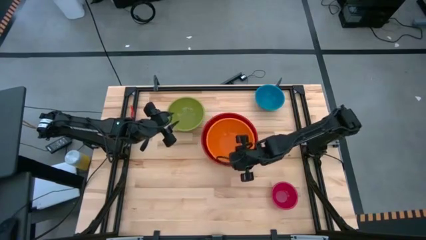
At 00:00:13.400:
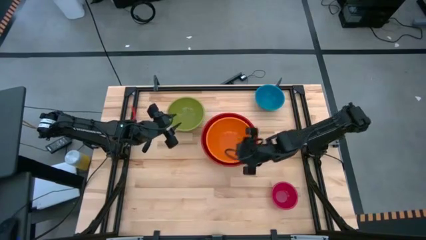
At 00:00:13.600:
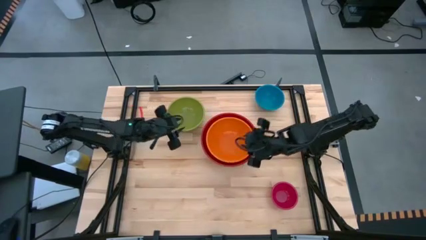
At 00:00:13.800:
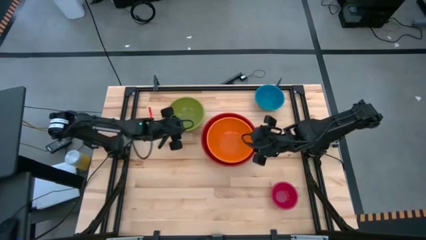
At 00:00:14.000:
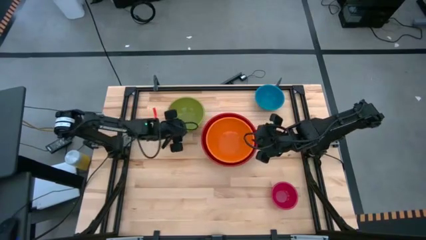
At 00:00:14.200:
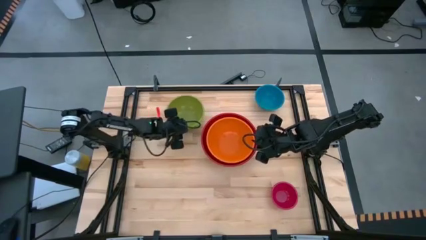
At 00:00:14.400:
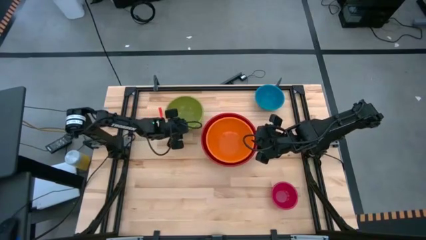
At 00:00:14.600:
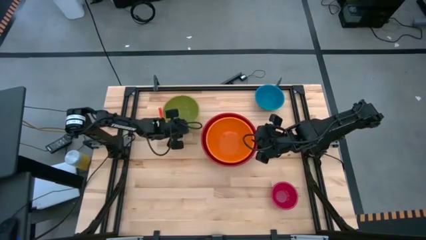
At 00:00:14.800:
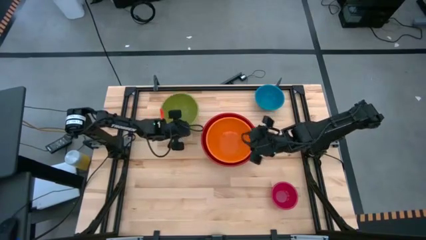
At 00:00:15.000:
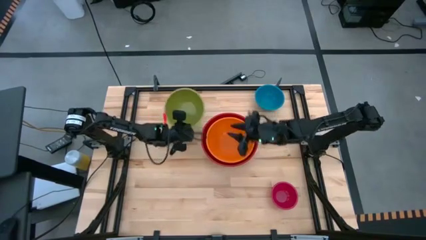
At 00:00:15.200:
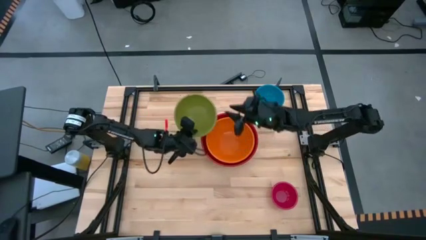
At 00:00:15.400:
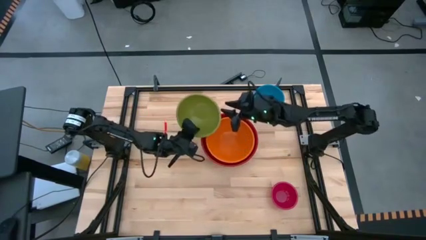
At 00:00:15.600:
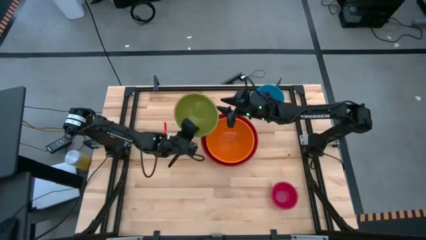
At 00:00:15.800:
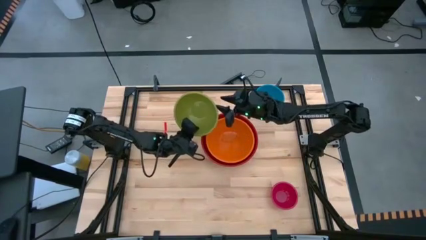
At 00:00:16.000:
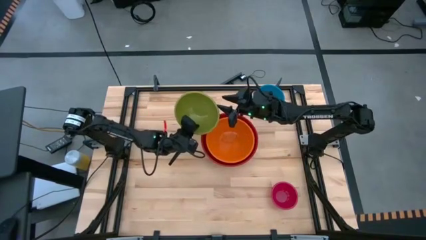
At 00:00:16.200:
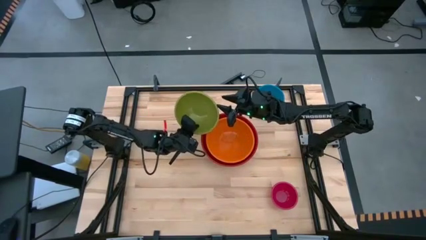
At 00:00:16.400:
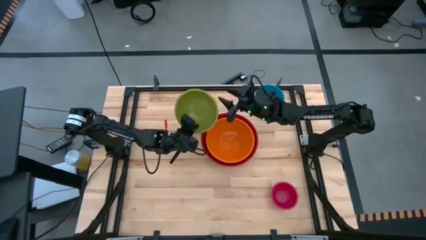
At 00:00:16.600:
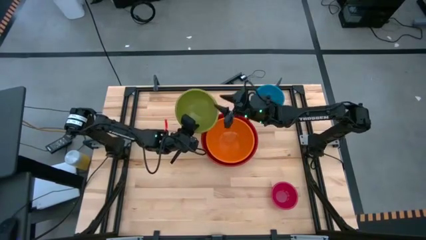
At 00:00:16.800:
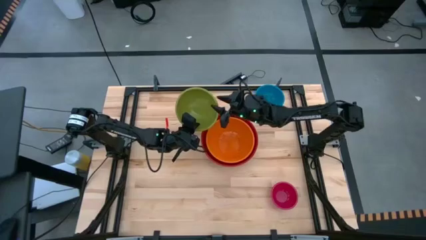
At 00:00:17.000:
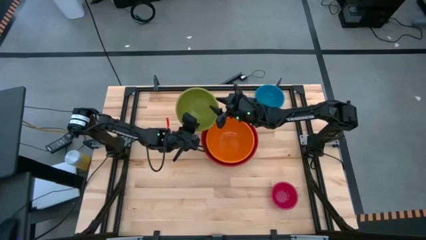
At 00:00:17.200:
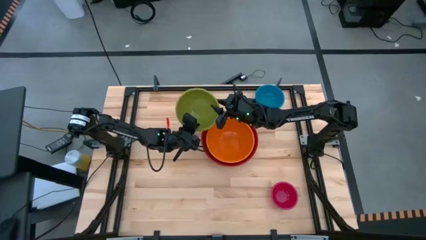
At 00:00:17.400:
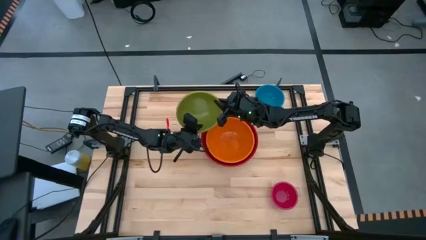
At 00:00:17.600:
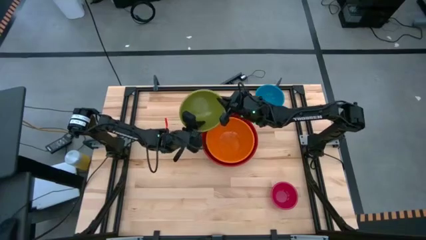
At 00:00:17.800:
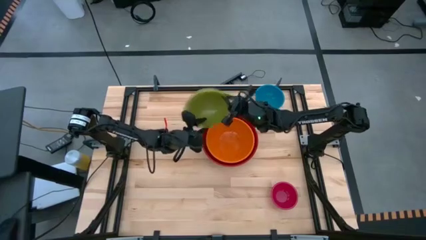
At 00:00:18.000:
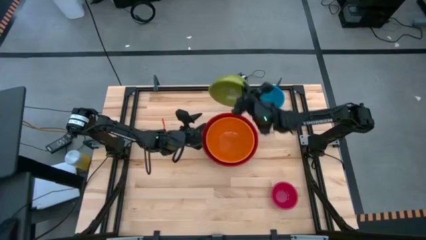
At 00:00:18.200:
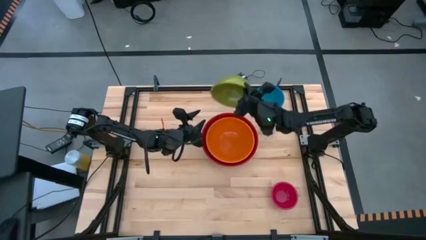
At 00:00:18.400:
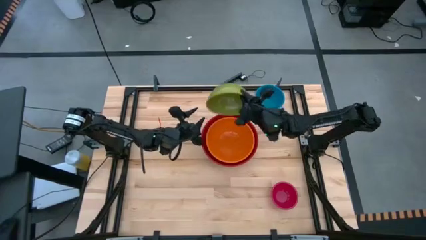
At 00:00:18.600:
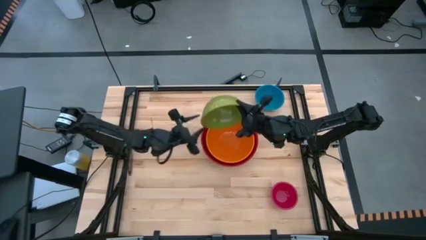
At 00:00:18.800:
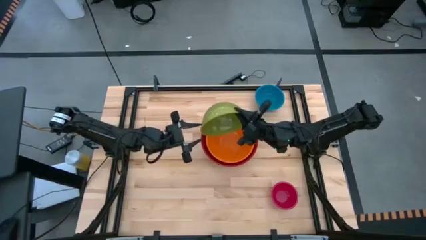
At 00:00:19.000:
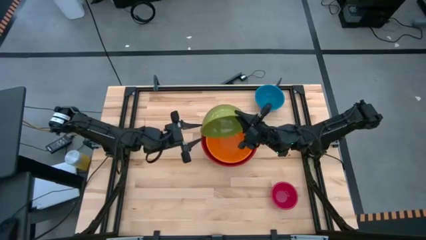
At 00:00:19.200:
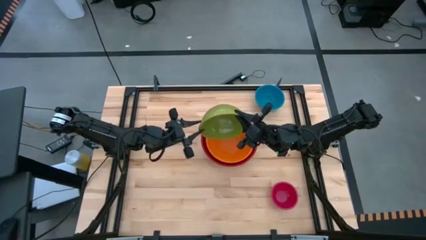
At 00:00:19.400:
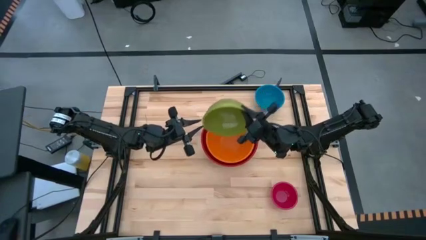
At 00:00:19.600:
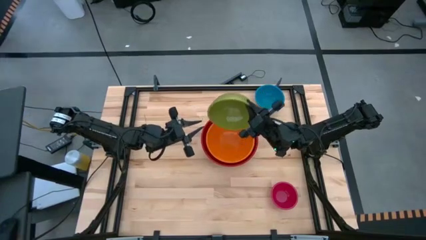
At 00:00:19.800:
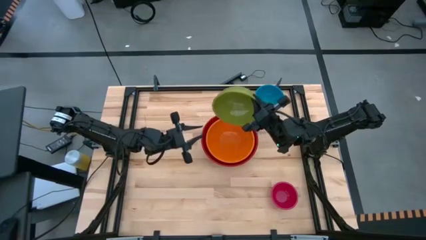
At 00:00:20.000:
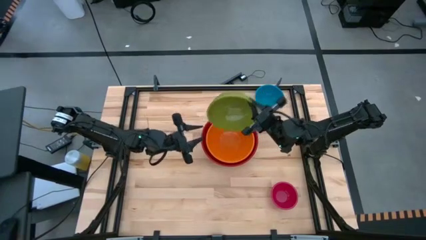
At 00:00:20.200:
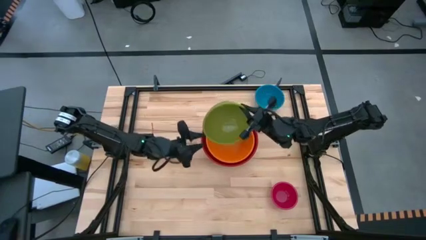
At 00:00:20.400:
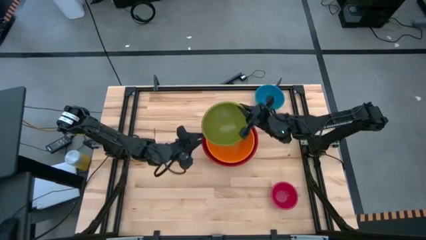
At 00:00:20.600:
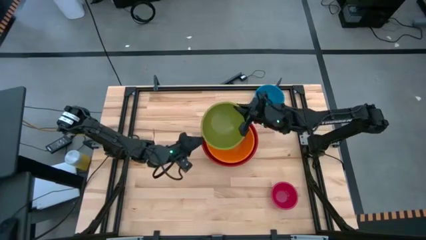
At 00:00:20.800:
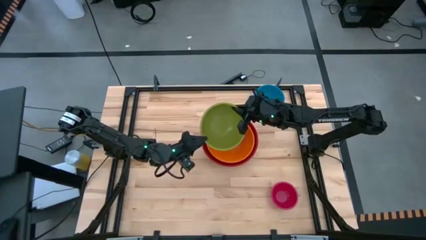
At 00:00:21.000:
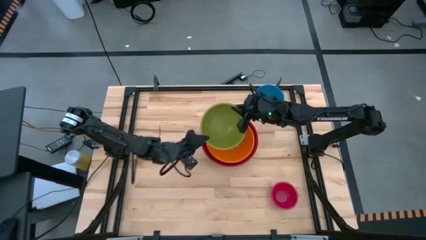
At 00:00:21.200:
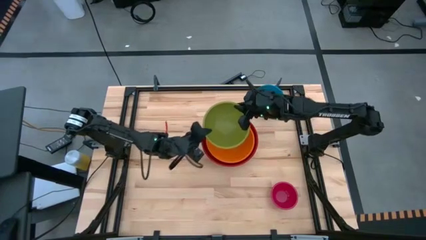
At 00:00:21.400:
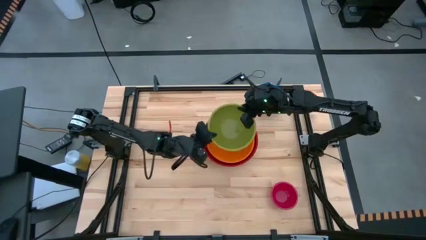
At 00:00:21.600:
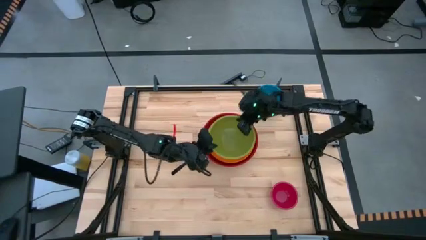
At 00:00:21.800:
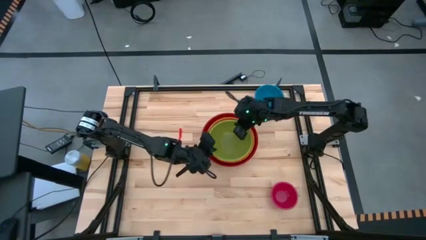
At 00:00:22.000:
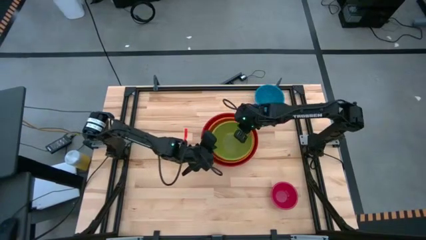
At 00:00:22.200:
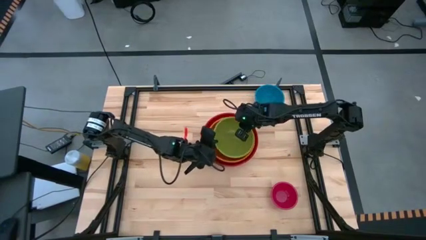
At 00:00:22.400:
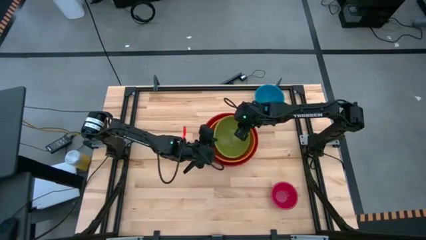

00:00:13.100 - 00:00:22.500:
Stack the green bowl on the orange bowl

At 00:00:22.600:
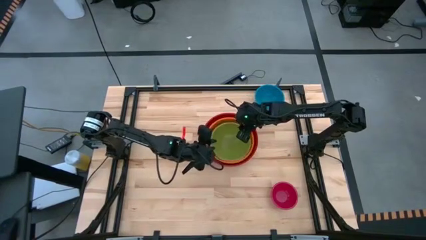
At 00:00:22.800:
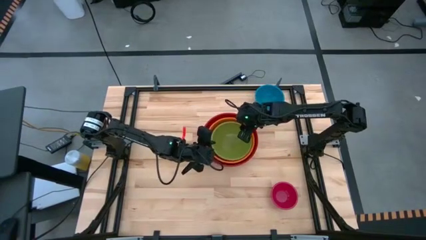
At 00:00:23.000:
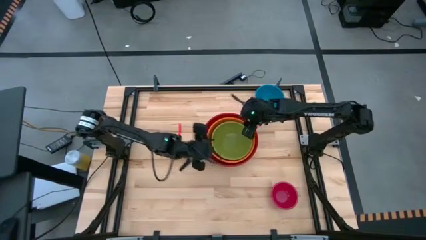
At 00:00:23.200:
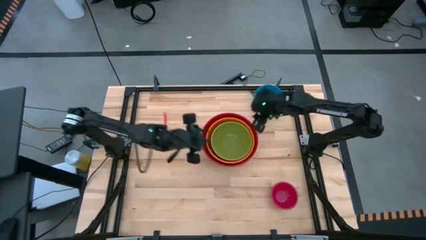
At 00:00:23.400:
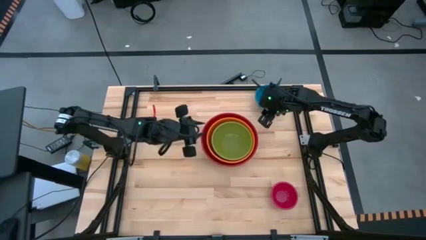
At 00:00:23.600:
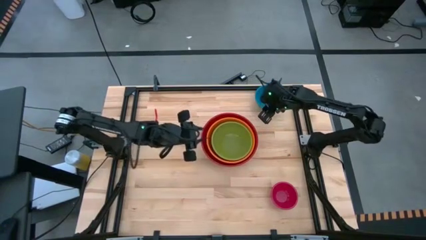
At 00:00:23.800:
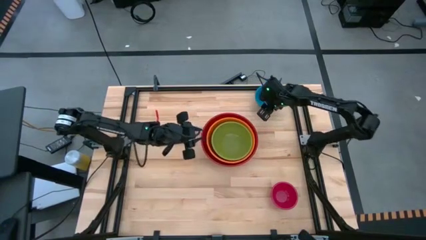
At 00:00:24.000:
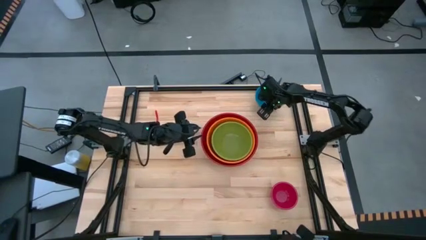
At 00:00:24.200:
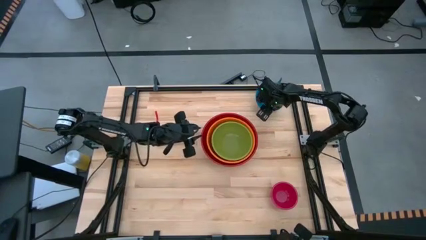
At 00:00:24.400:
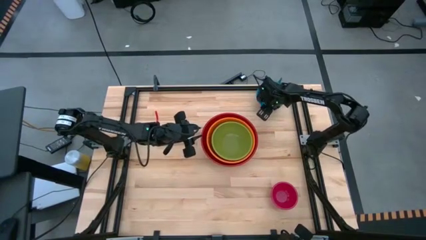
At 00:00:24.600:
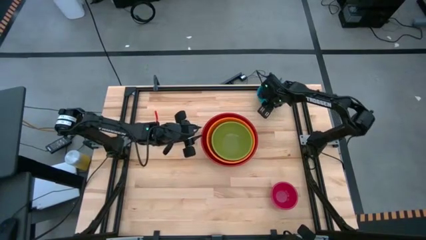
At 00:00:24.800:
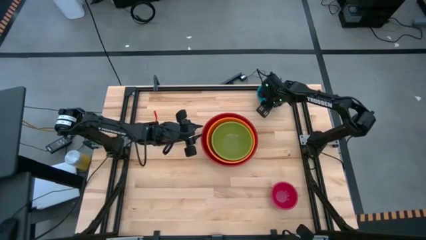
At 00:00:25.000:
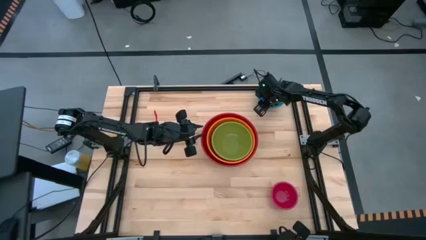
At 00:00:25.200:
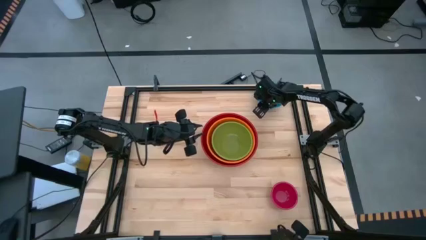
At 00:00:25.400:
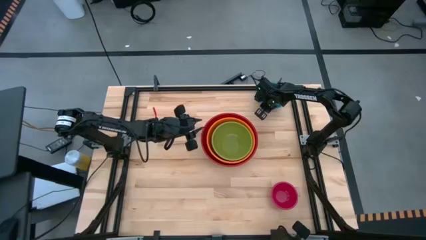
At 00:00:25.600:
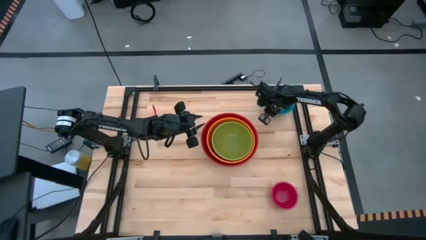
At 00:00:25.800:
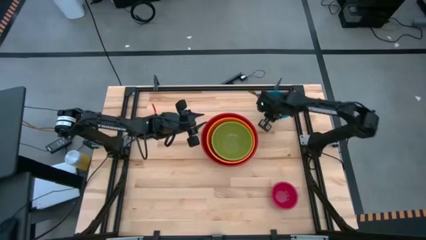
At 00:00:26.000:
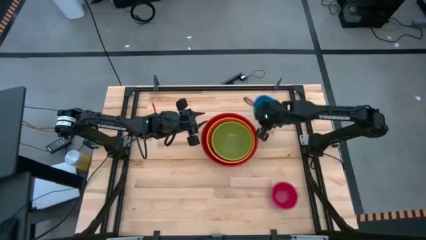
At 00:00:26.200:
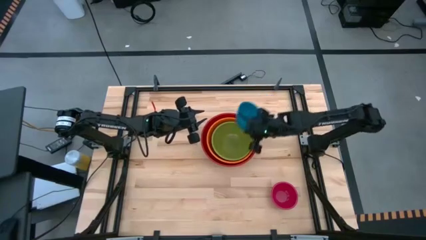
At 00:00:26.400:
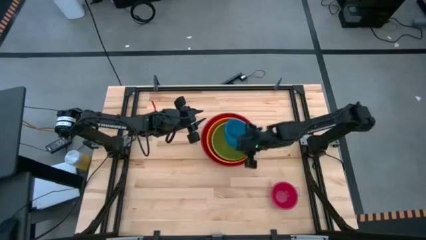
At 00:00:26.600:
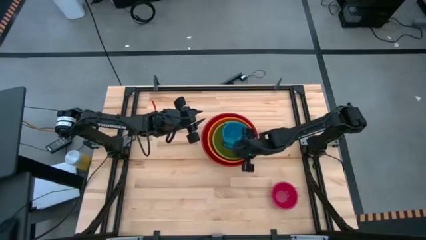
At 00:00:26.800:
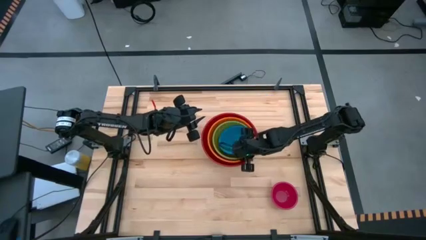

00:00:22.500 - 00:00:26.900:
Stack the blue bowl on the green bowl

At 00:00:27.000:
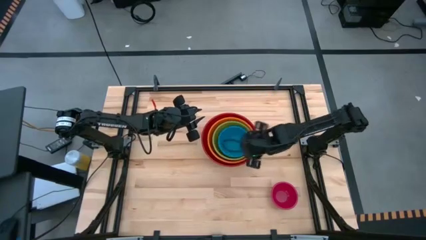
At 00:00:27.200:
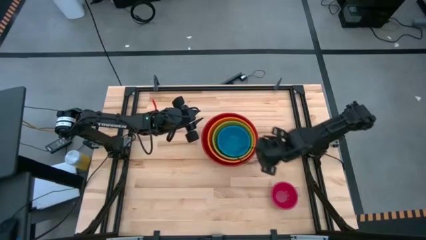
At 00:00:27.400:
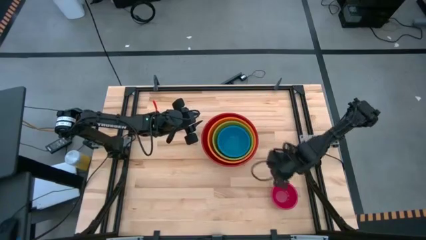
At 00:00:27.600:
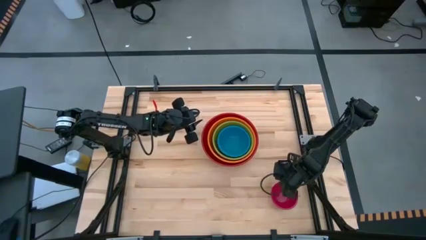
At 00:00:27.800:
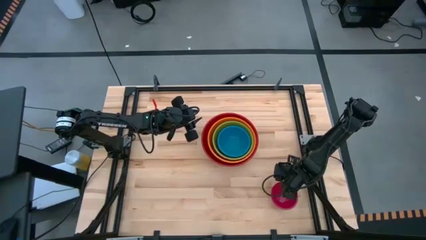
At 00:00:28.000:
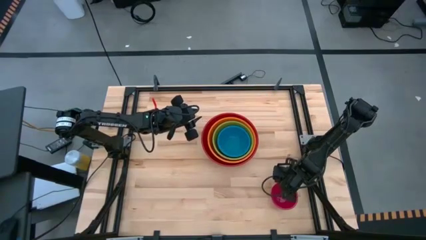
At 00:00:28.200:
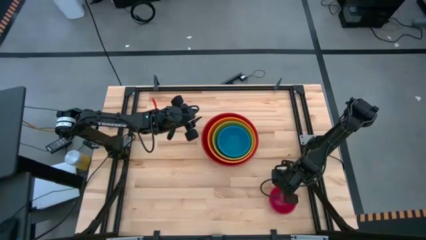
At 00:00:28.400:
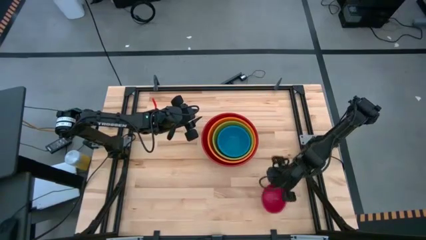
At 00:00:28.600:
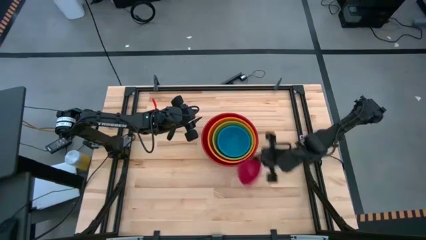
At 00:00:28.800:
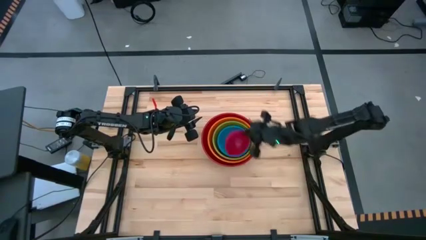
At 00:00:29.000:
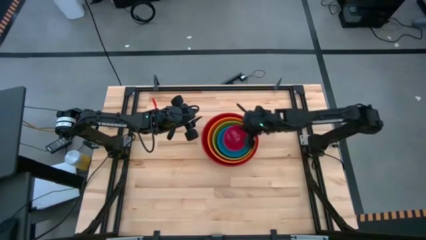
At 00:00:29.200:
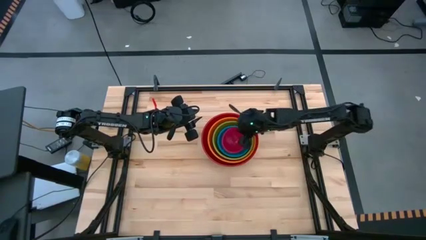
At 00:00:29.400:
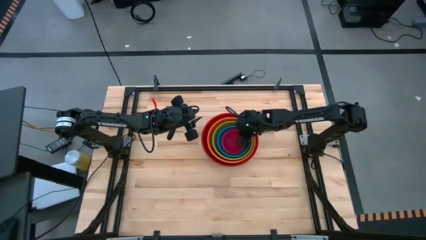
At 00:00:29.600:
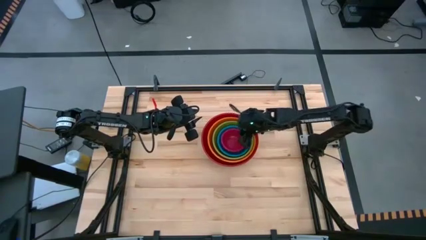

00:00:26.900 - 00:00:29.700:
Stack the pink bowl on the blue bowl
